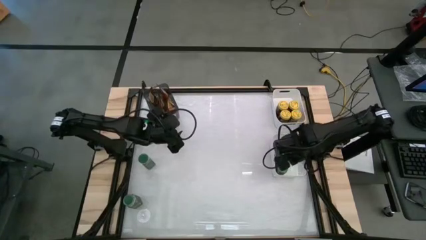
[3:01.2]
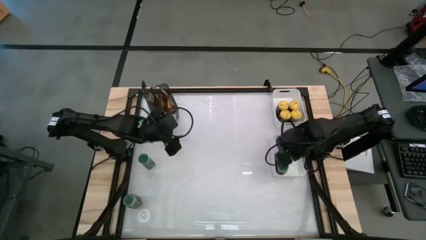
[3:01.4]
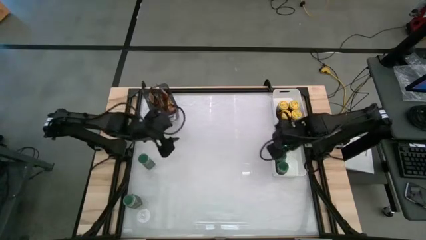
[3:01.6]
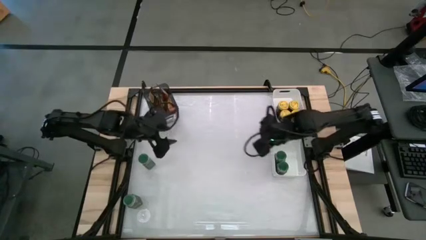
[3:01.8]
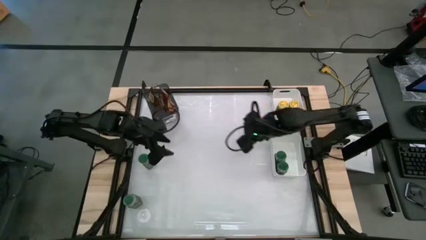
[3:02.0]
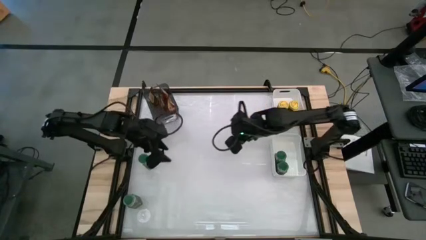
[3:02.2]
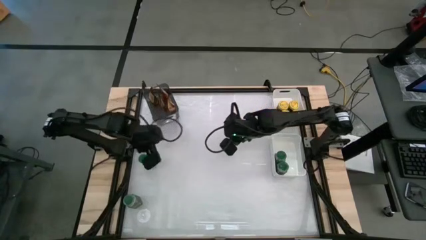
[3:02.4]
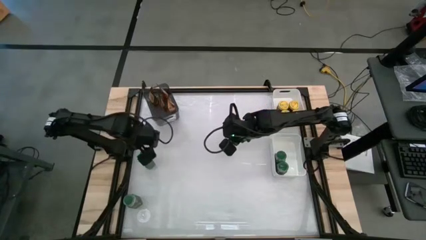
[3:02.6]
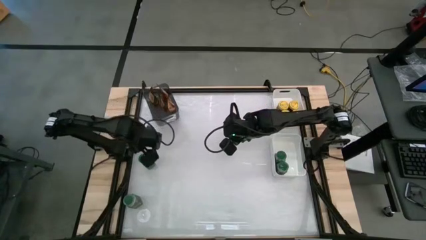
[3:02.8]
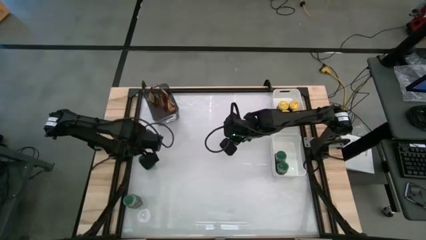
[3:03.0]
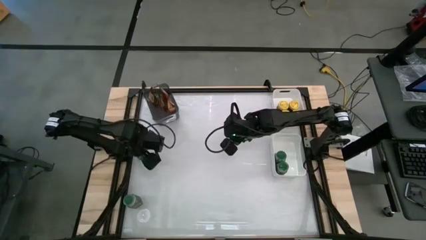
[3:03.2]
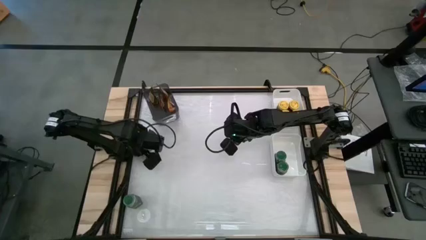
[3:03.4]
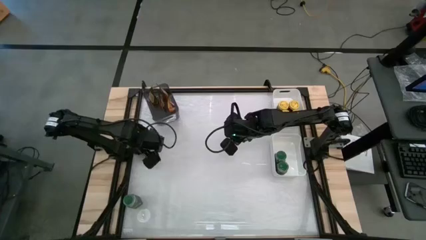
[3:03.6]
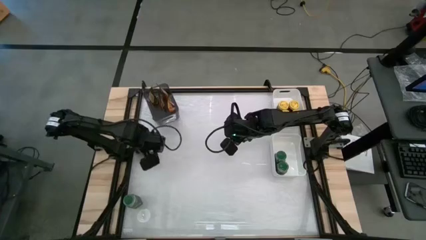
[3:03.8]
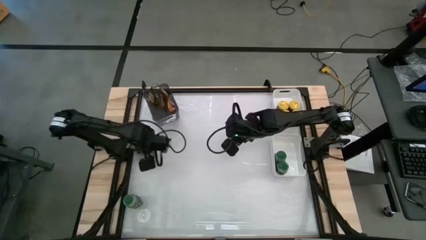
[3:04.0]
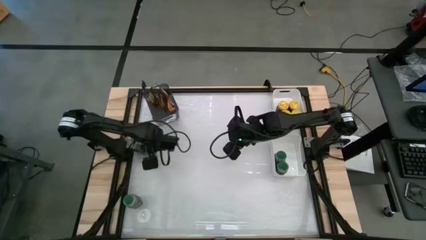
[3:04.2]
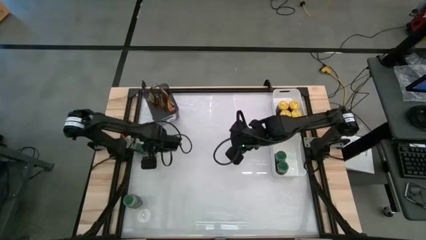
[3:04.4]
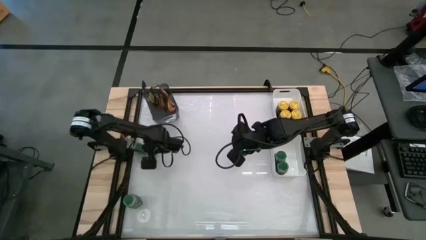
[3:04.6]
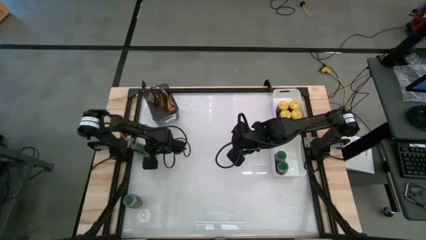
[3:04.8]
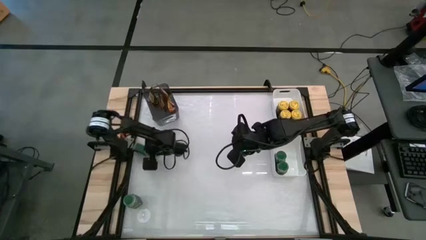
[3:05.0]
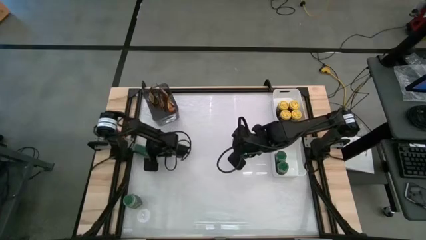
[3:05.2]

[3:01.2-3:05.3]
Task: Sort spices by type
Put the green seasoning bottle into the bottom white bin

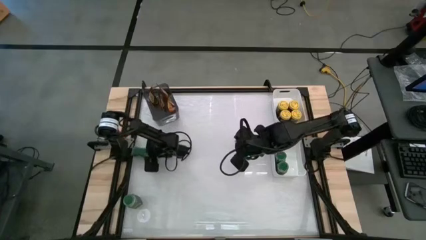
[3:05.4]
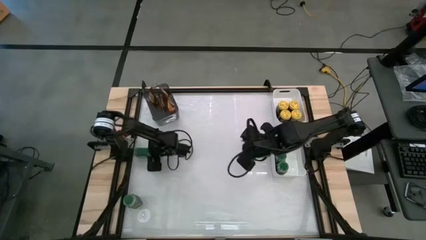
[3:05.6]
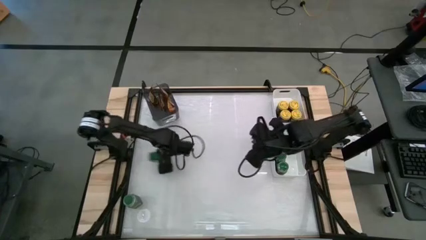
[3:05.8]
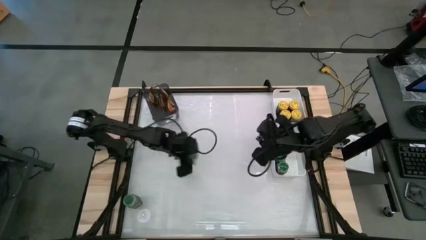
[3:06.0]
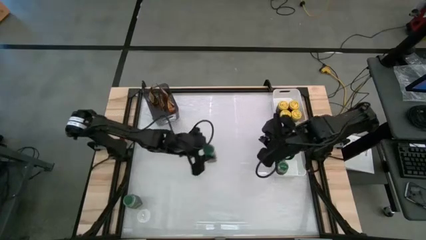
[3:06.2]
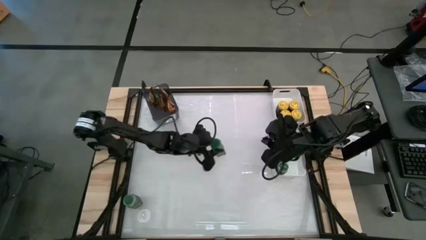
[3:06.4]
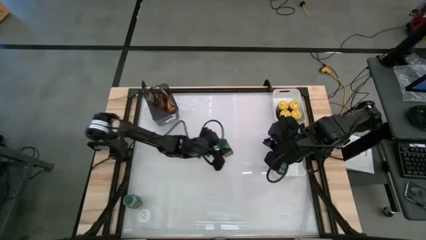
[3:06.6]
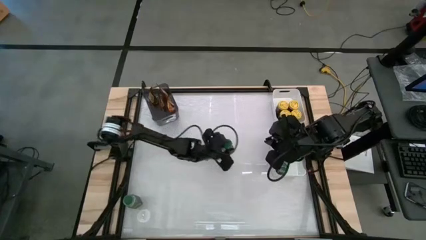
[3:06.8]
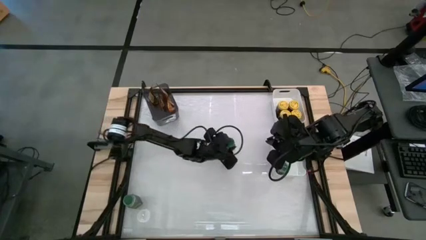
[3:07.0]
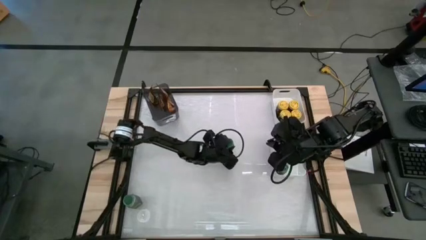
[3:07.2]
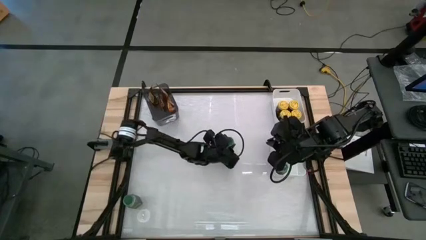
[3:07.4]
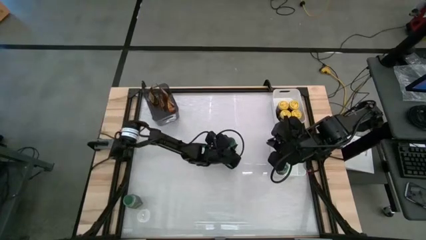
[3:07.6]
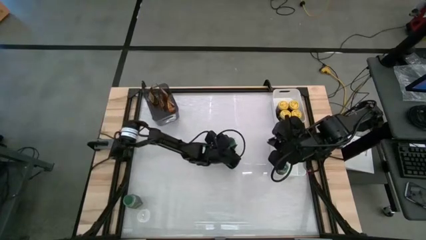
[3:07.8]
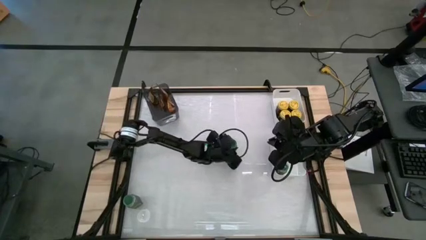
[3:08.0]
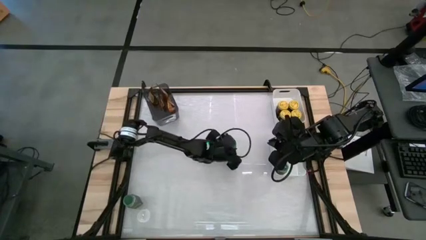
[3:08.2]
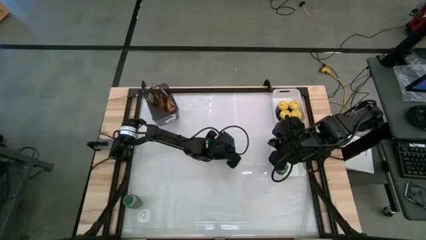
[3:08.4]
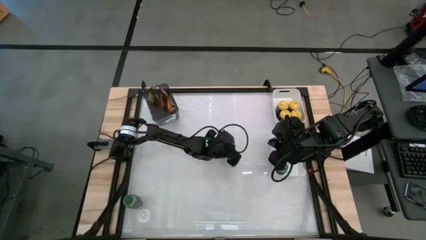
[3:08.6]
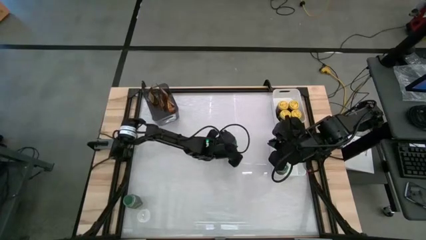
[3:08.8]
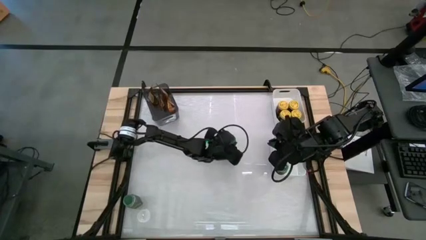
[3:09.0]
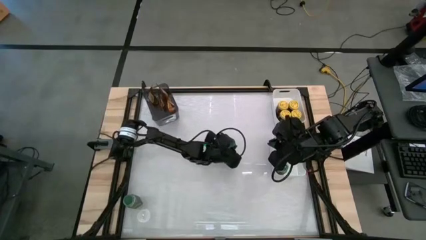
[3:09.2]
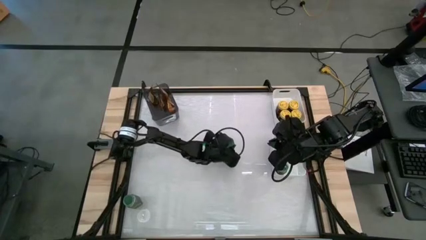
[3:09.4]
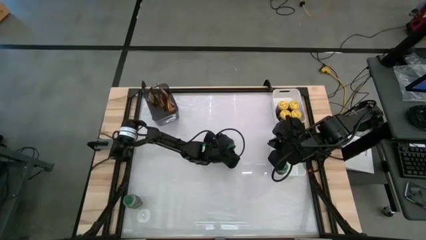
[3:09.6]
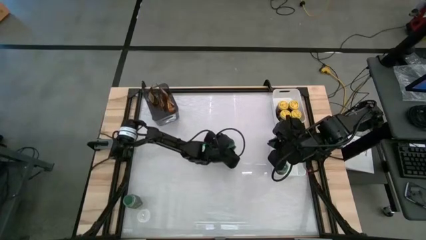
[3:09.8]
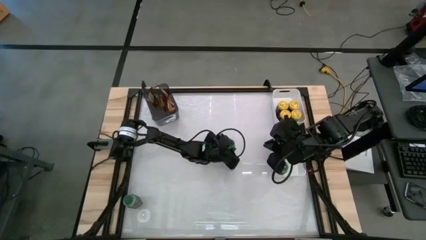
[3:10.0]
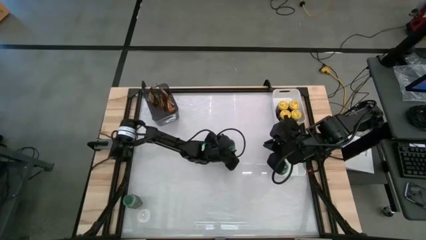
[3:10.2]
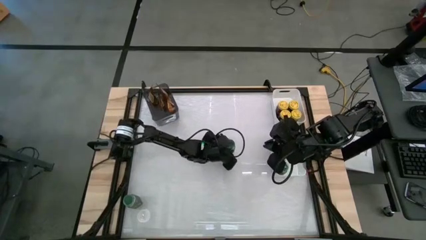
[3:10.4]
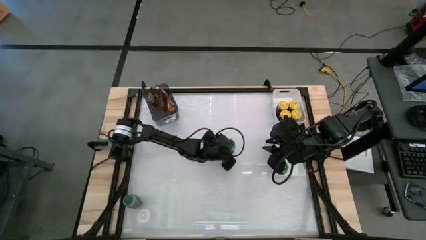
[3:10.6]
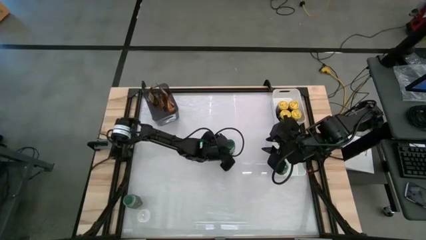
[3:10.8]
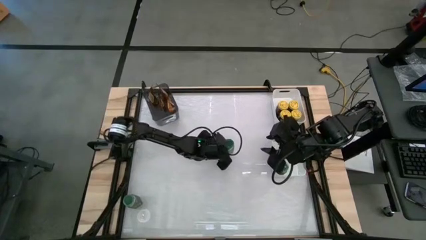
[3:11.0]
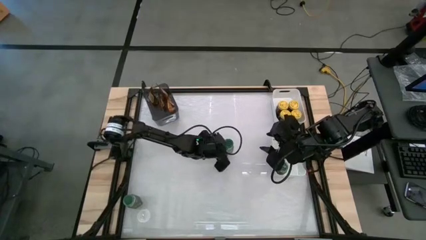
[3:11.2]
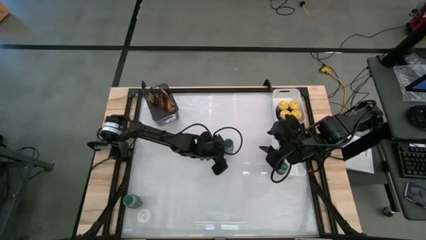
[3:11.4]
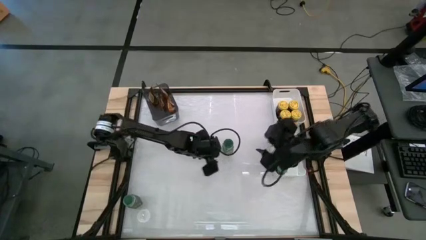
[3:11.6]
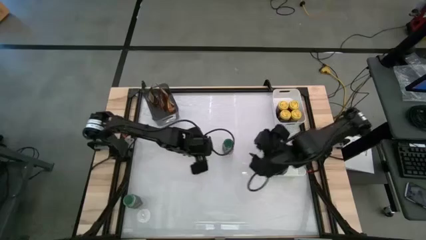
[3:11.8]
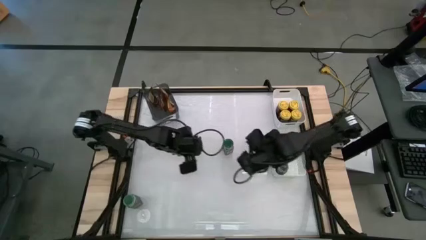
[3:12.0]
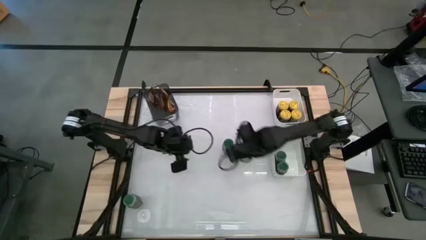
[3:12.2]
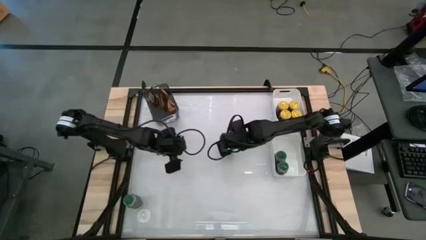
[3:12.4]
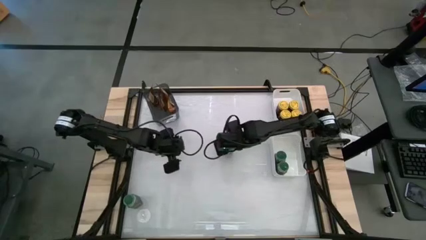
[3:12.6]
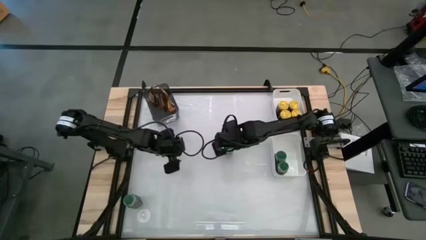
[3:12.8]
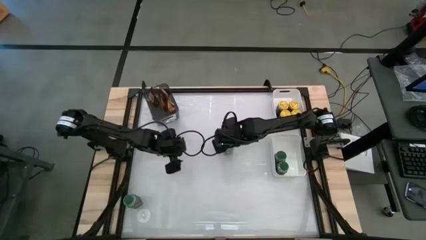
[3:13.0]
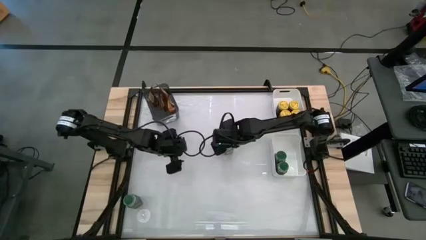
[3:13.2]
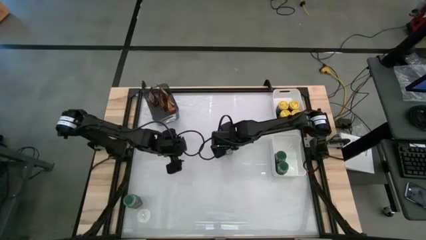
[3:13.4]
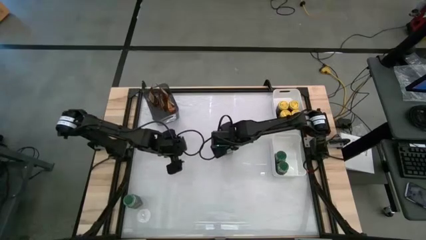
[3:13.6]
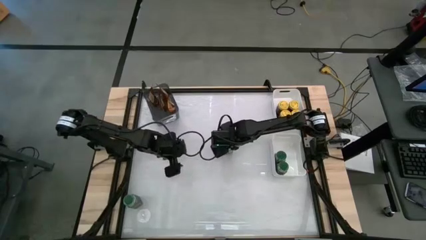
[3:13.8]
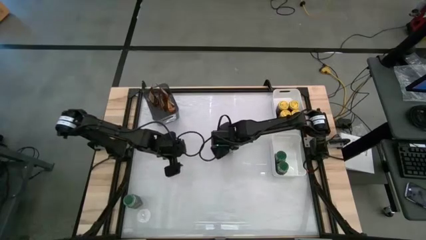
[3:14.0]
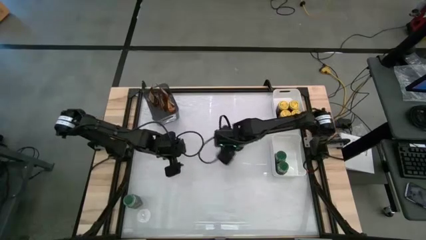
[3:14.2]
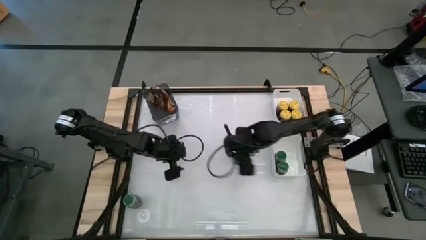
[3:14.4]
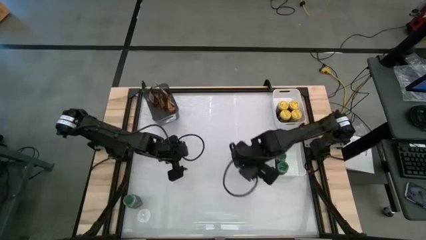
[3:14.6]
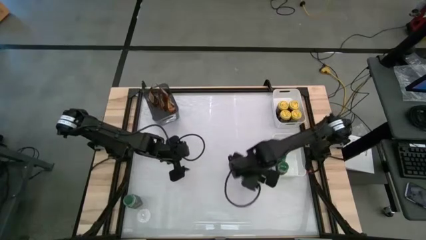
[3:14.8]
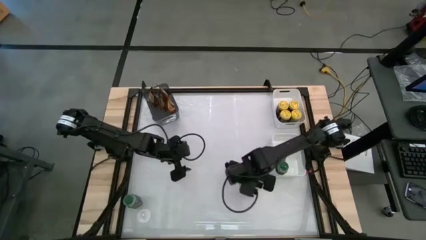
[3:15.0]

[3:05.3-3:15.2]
Put the green seasoning bottle into the bottom white bin

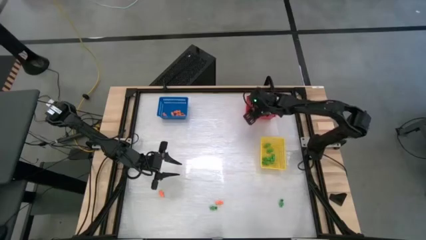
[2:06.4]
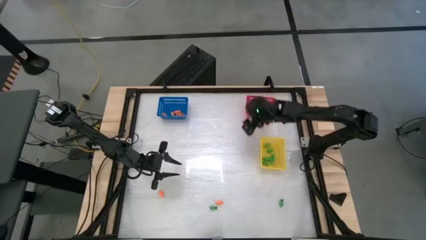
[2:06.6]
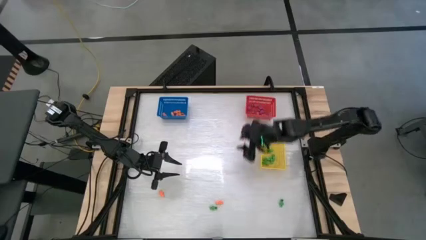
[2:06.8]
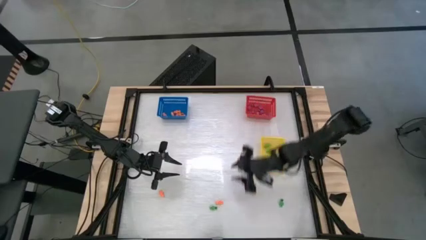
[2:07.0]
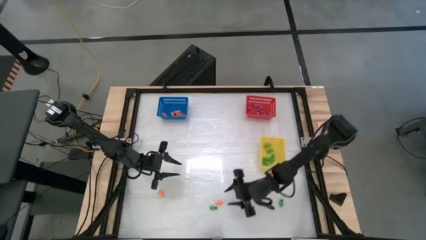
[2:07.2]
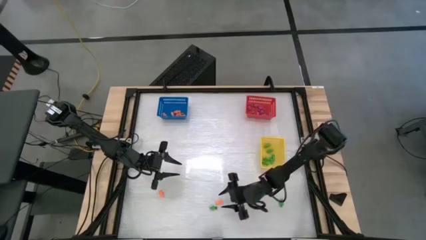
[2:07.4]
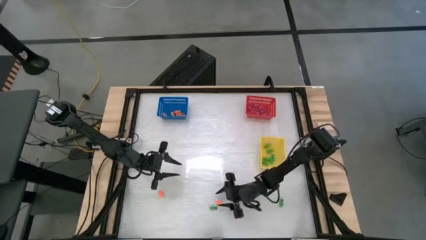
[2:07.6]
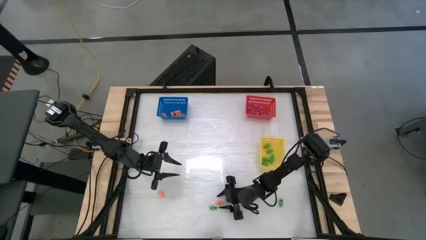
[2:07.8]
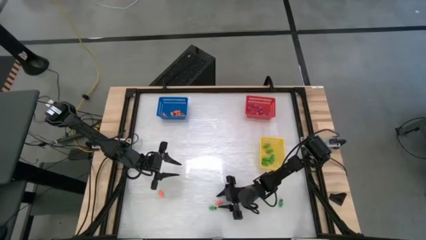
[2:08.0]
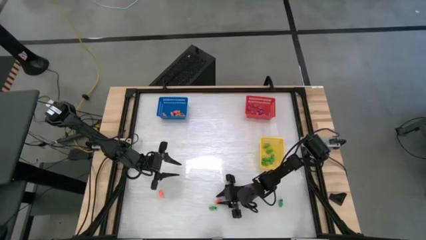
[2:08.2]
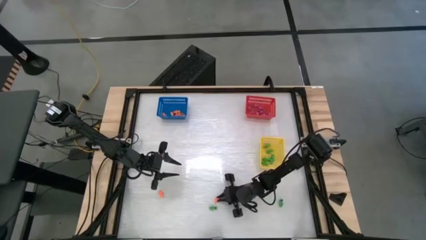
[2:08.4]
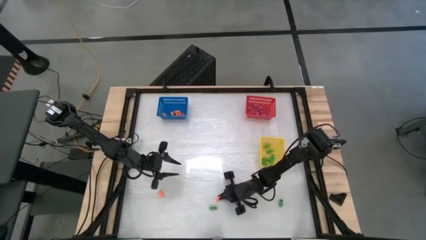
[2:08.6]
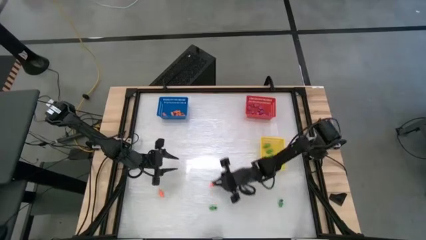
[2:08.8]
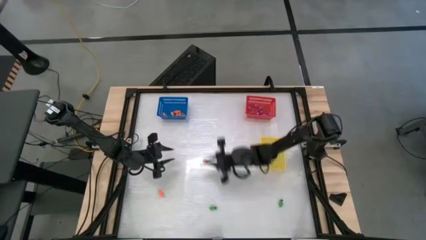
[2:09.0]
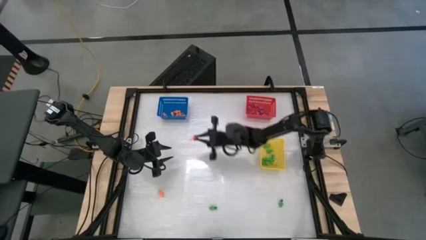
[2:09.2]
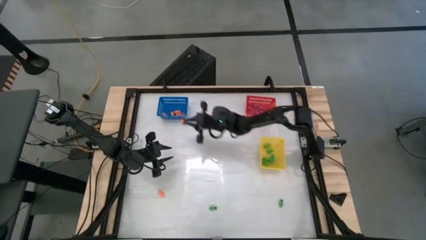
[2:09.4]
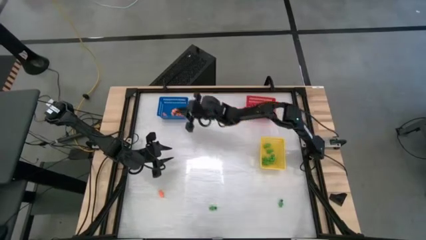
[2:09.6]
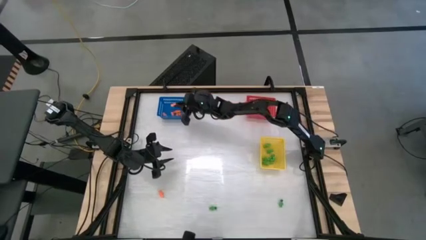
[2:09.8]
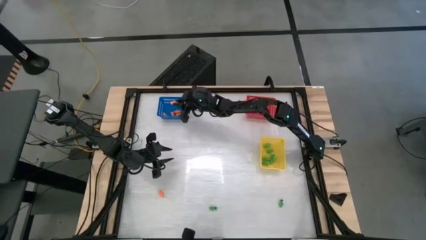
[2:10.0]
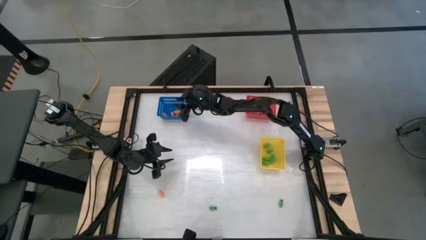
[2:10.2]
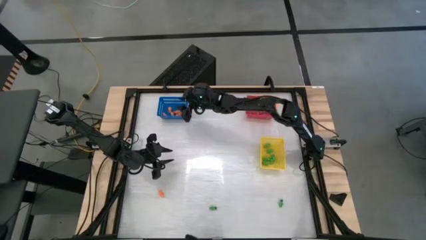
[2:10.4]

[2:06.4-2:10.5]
Task: Sort Halloween decoration
Put the orange skeleton toy into the blue bin
